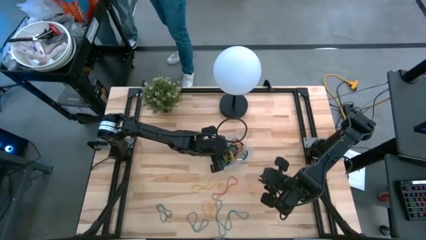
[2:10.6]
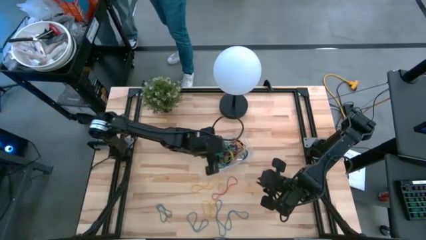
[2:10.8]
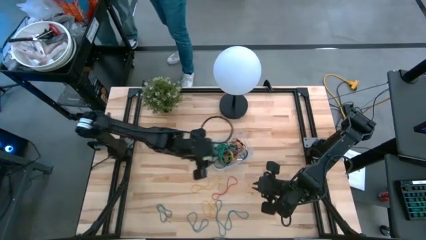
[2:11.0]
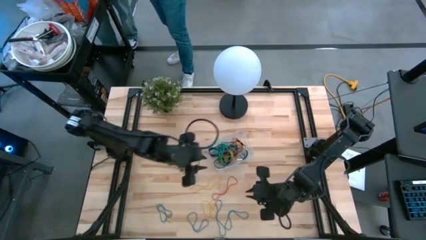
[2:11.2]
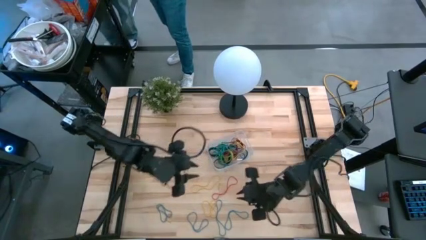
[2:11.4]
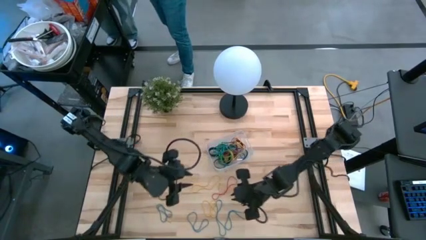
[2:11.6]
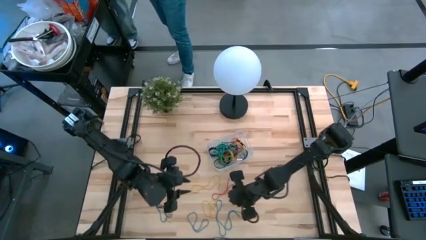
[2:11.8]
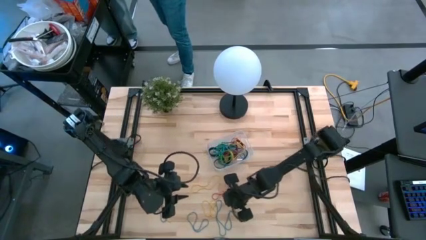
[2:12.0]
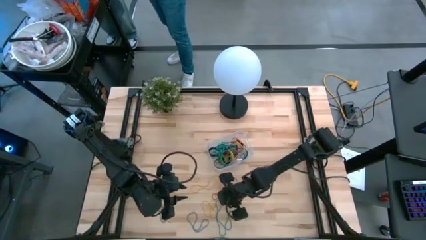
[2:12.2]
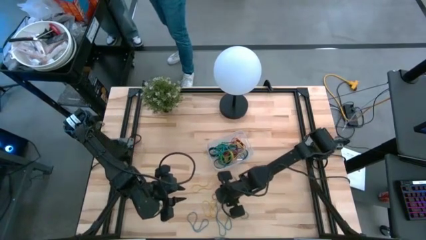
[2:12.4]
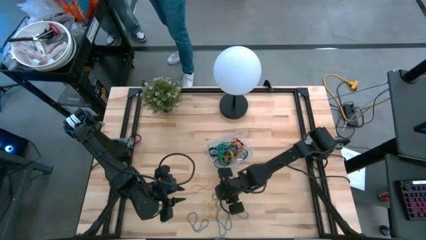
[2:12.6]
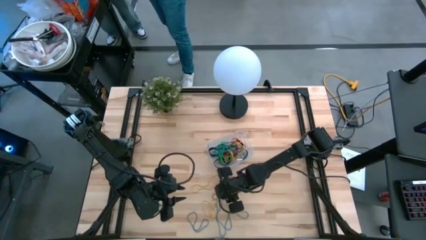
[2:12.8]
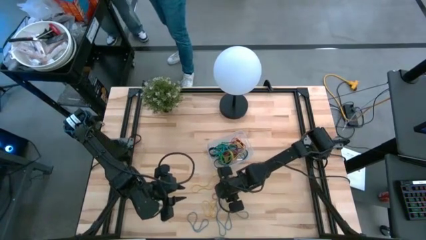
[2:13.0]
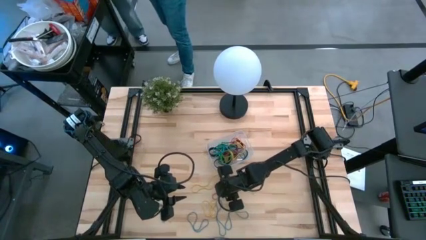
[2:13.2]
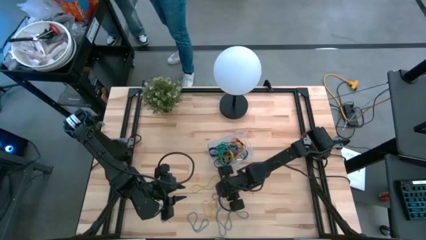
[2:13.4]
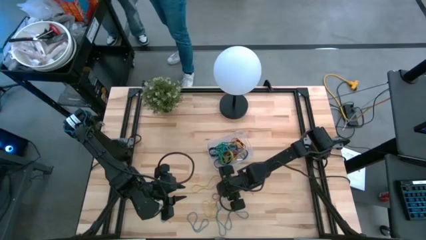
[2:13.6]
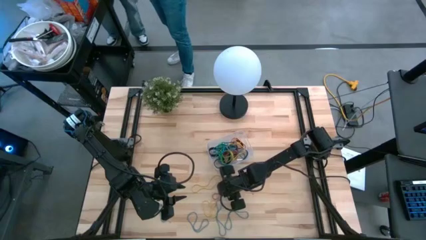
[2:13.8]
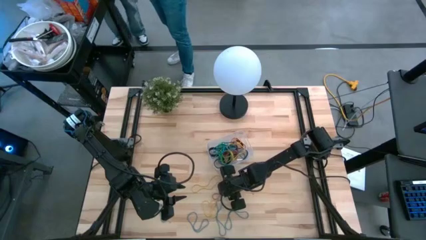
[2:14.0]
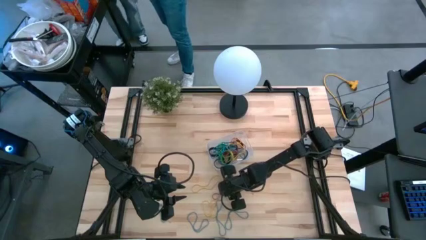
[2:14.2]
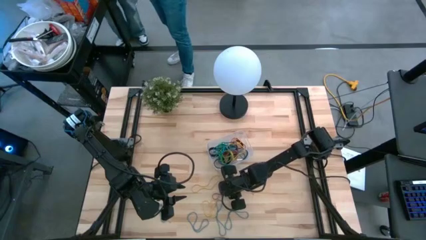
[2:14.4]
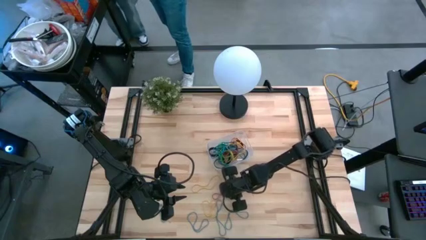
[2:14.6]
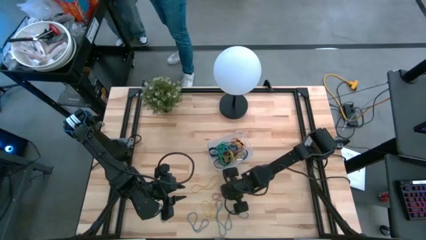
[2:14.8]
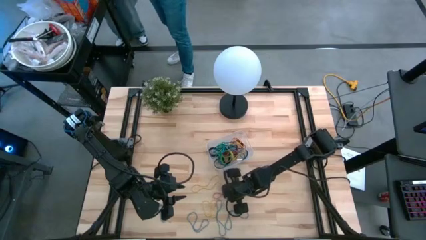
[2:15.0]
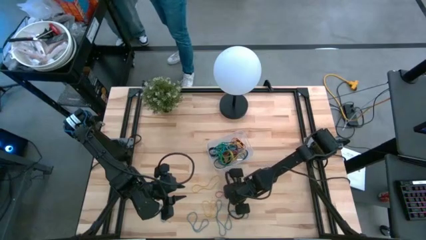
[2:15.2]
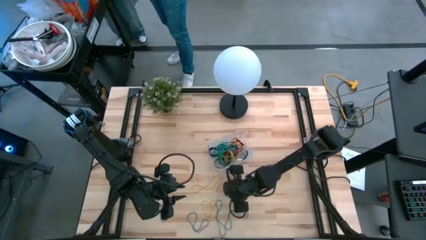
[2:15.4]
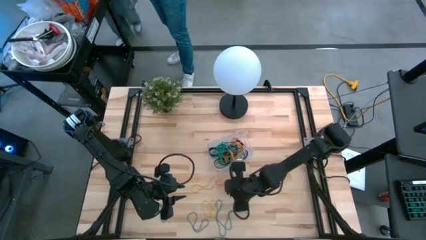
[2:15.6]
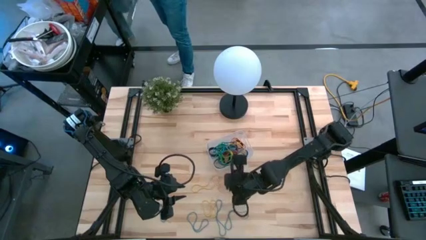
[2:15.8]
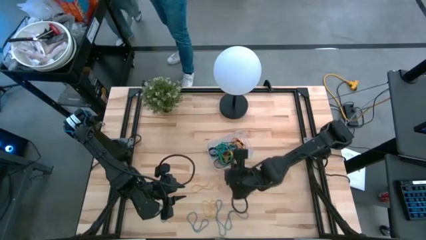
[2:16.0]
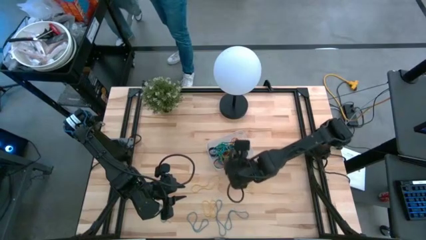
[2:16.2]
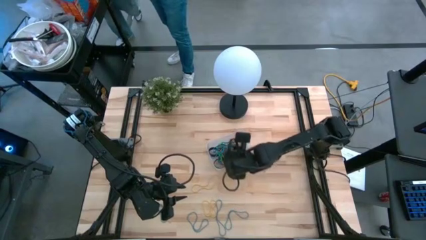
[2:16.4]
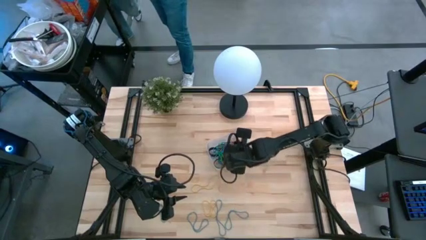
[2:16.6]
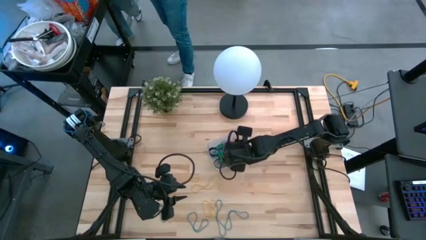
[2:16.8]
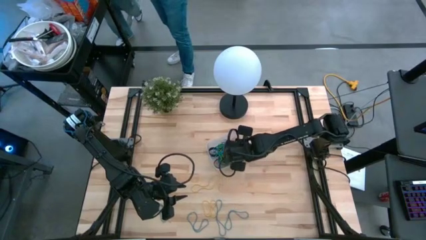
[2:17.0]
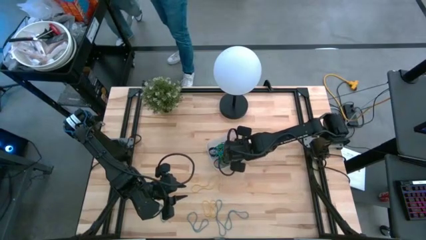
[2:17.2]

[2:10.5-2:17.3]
Task: Pick and place rubber bands into bin
Put the red rubber band into the transparent bin

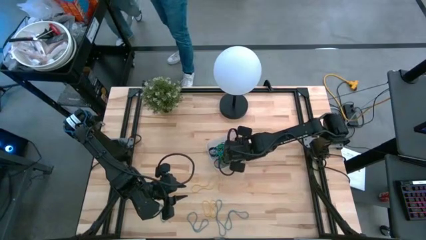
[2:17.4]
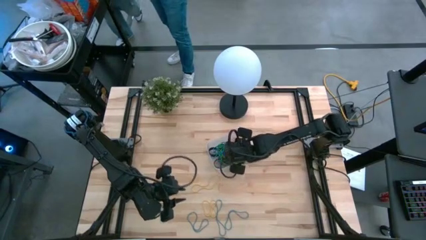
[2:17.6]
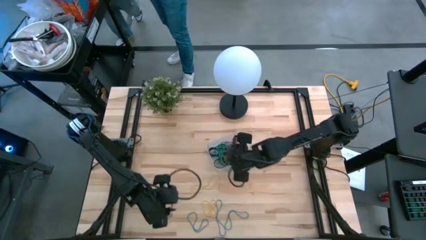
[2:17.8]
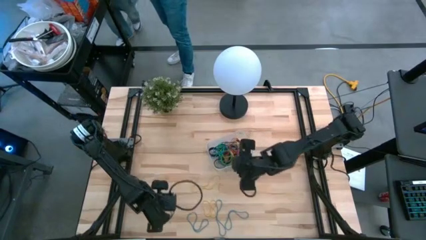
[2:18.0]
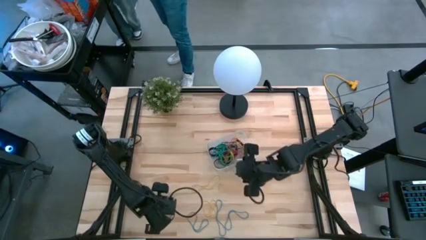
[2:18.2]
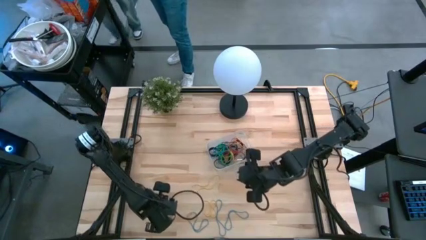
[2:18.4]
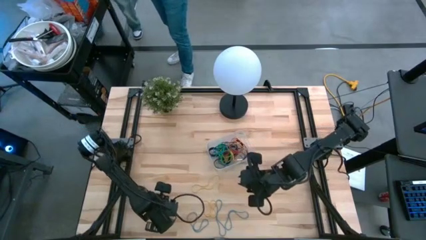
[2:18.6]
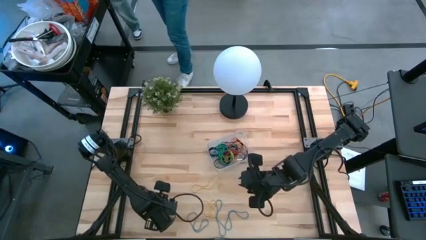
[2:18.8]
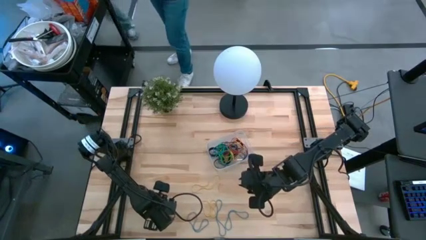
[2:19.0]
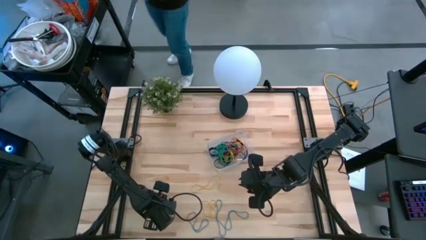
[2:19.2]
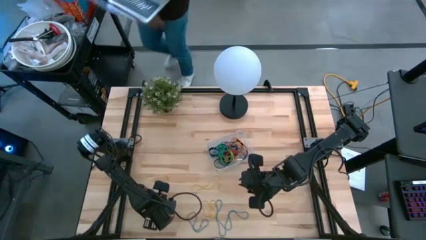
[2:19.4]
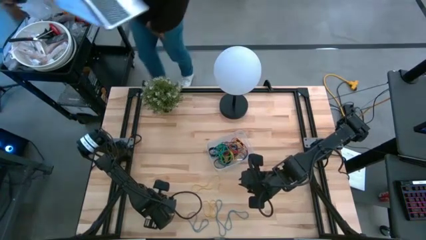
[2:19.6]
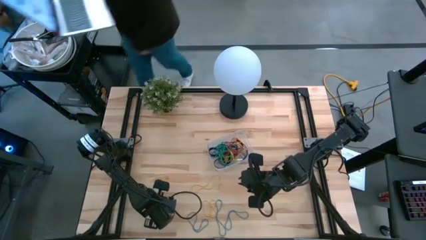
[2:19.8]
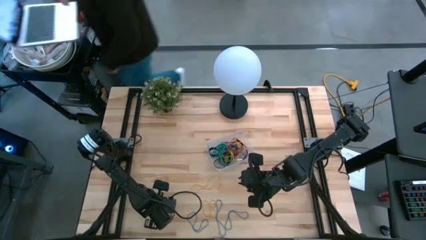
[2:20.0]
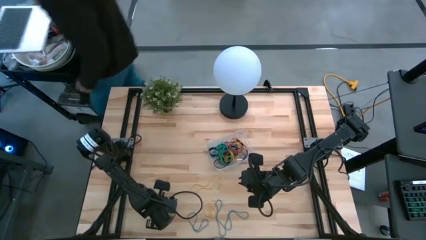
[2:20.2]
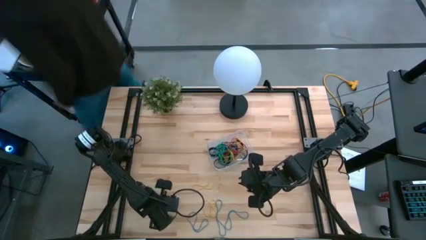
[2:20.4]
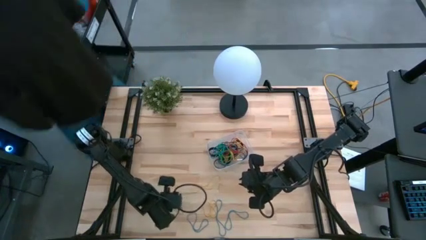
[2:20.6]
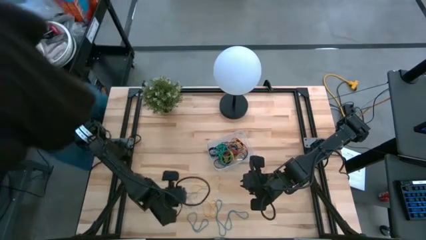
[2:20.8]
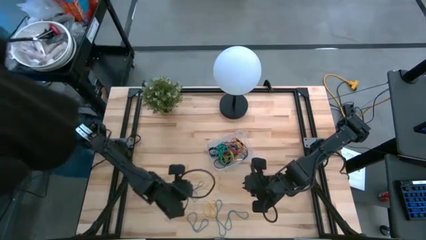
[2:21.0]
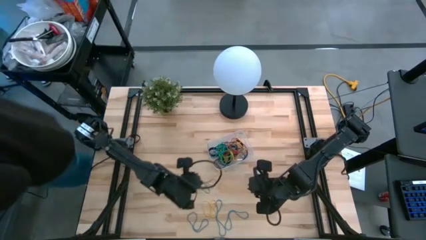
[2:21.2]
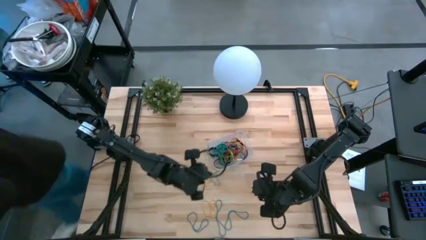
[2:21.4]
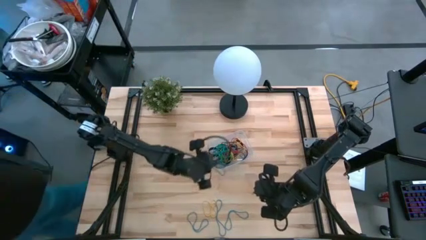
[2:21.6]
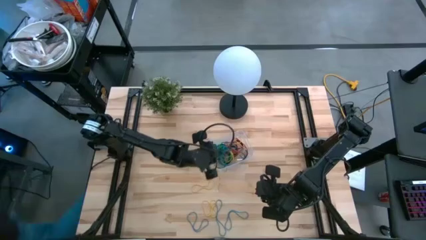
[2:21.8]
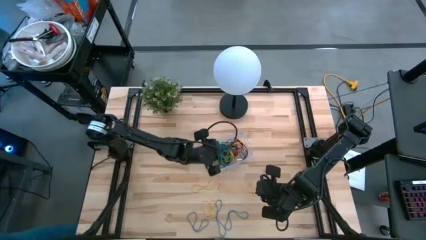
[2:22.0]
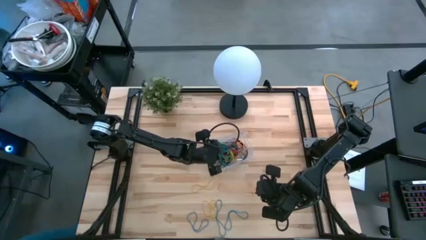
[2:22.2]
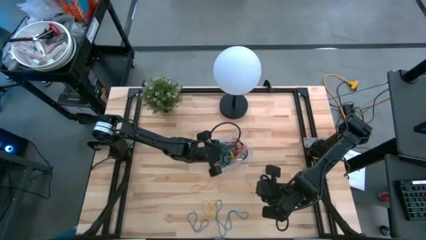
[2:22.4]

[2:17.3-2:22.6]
Put the blue rubber band into the transparent bin

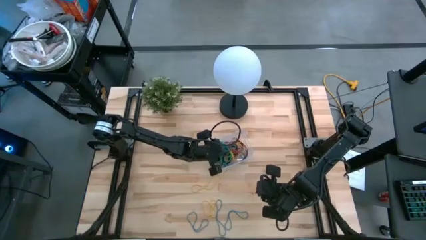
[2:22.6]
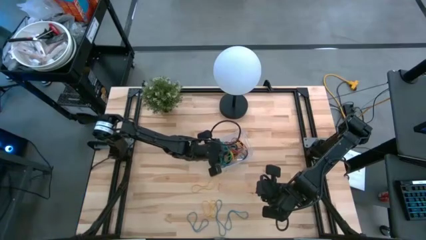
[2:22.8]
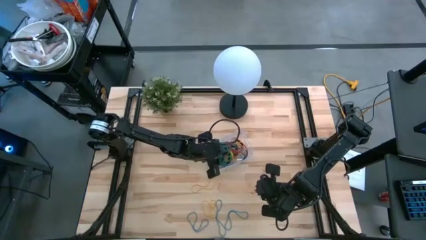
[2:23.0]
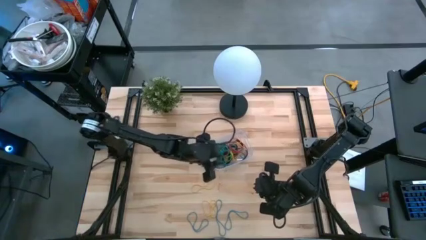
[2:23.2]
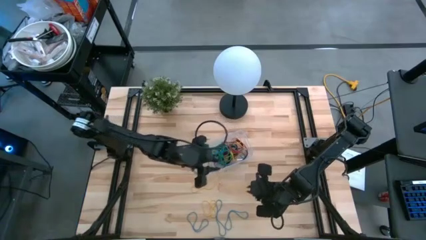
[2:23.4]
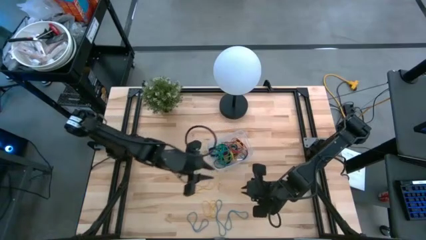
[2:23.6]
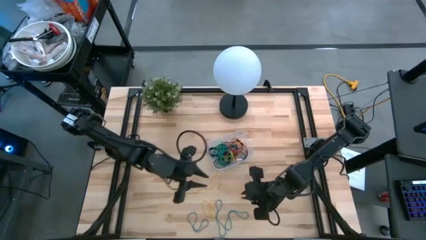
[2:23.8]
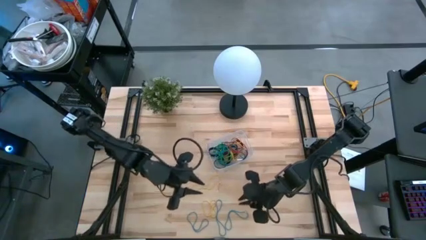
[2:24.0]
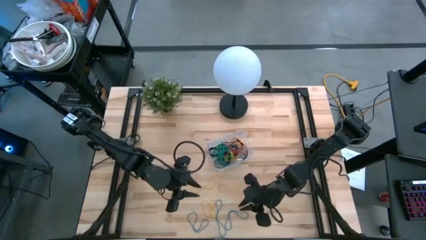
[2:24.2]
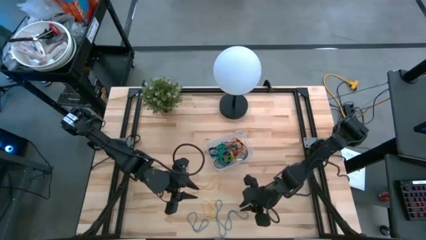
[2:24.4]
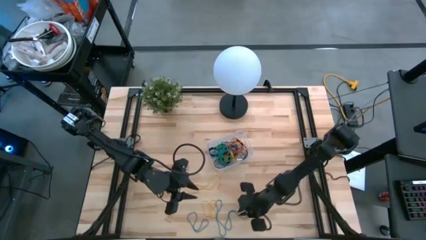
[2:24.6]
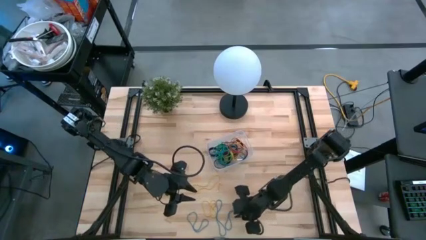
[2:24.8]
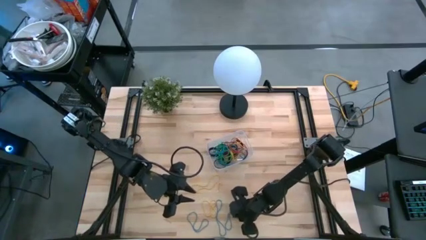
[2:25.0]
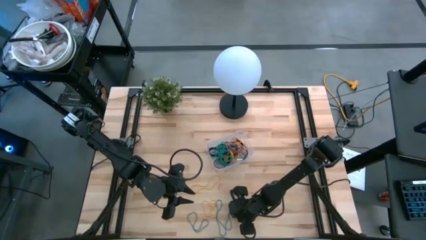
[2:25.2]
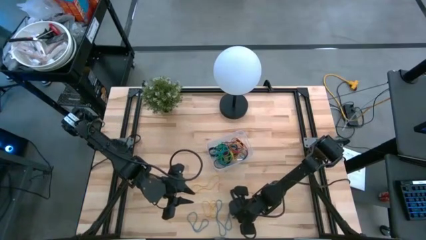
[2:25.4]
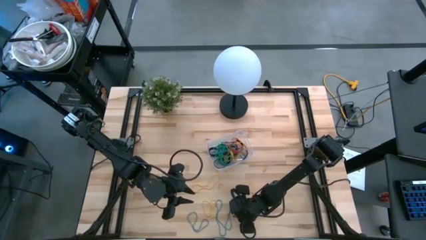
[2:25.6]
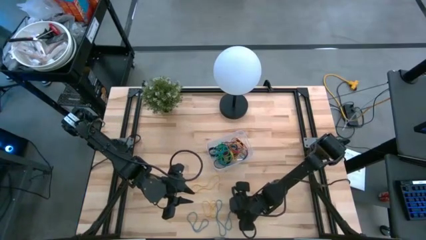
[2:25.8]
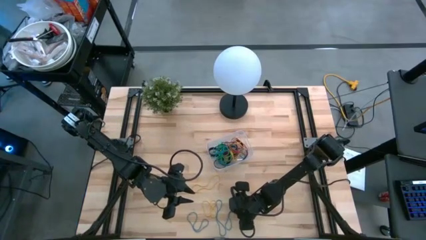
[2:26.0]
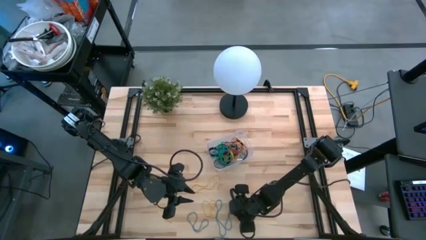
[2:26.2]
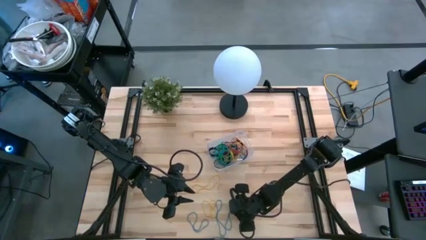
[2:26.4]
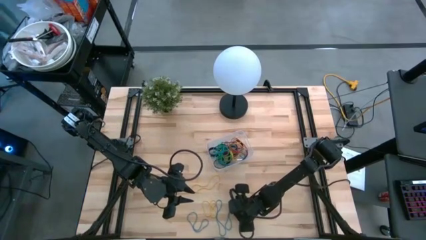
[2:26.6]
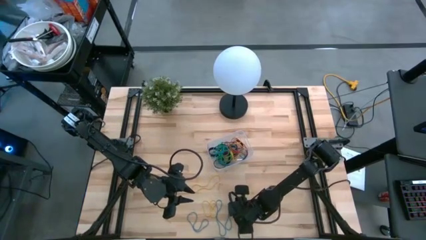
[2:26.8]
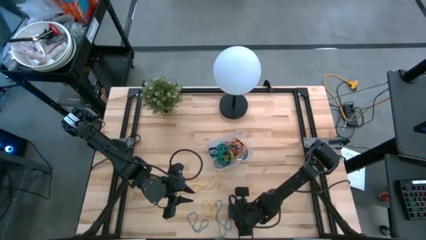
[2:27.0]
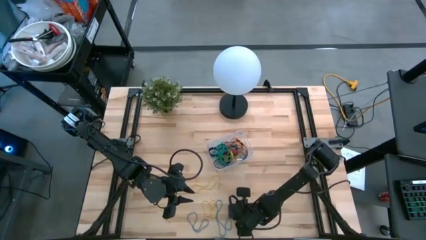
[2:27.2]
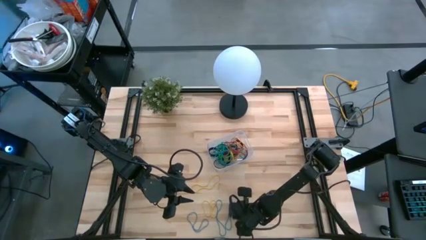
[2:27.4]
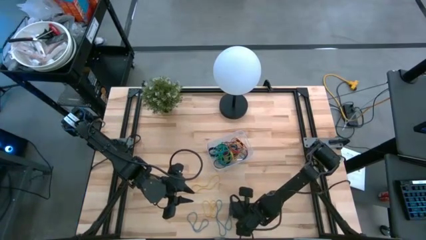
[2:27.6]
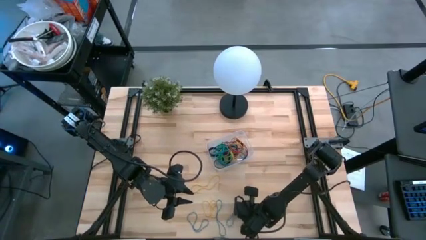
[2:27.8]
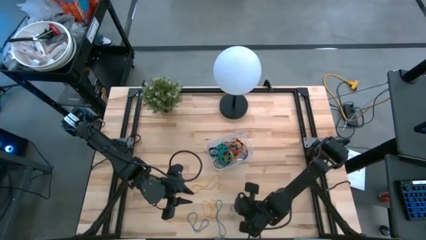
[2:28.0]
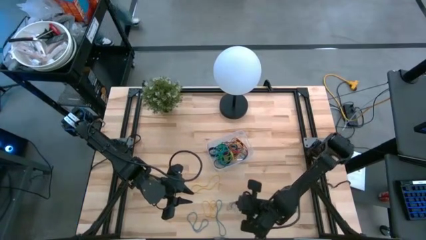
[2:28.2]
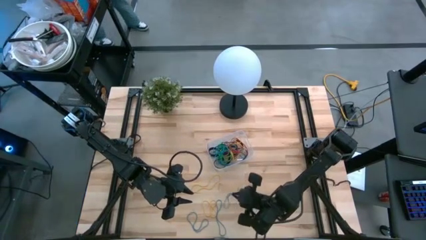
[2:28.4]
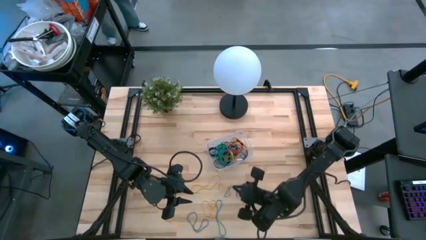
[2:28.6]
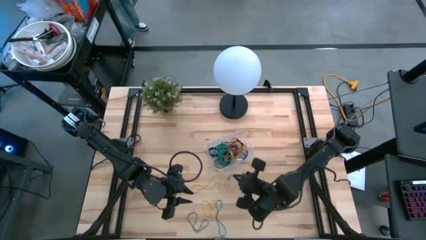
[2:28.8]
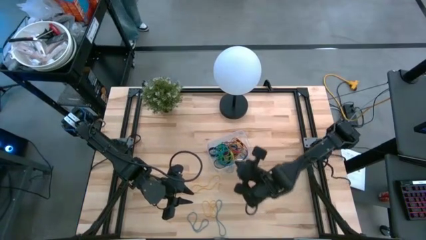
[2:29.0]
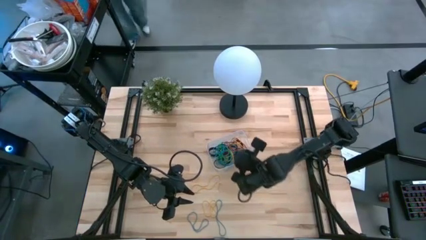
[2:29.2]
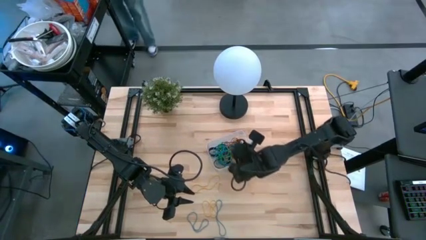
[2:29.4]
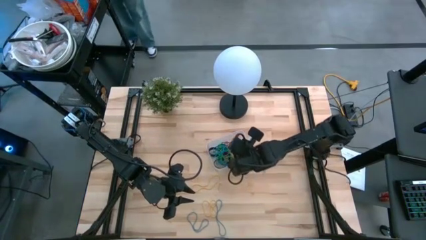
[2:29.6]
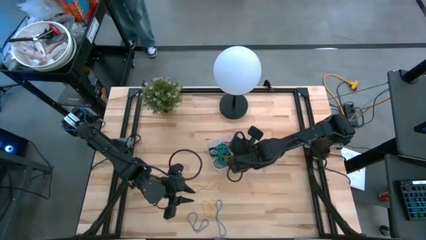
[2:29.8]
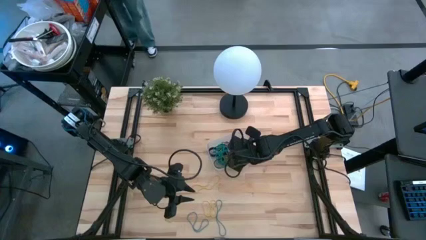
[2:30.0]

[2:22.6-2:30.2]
Put the blue rubber band into the transparent bin
